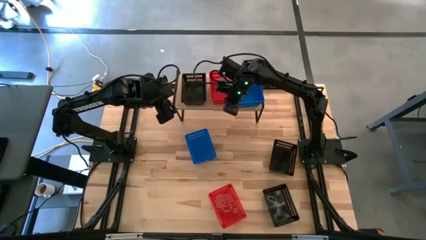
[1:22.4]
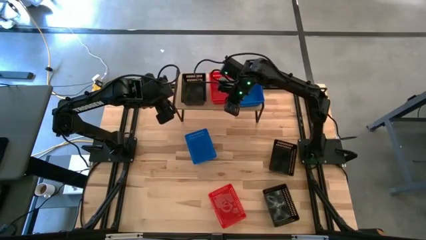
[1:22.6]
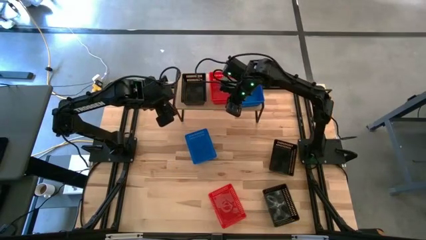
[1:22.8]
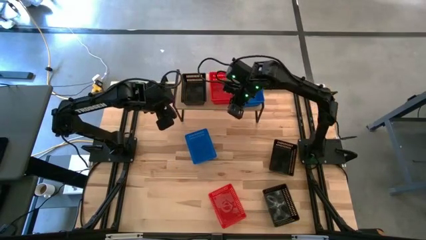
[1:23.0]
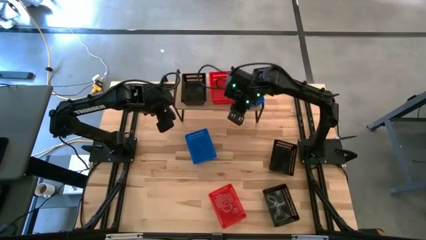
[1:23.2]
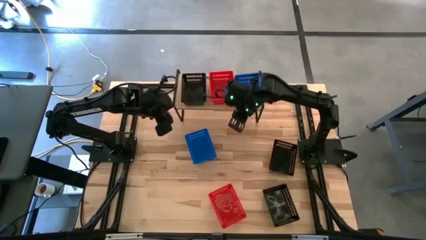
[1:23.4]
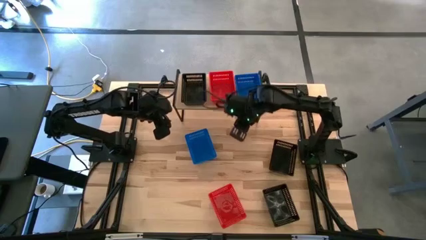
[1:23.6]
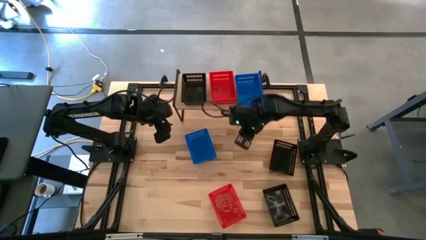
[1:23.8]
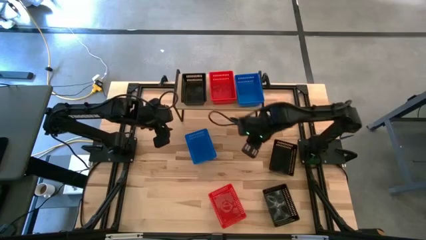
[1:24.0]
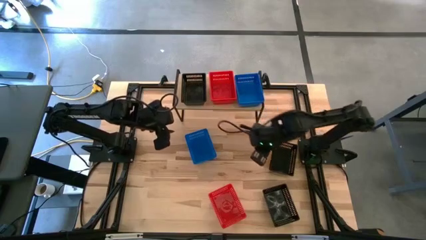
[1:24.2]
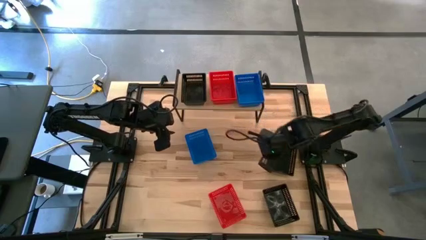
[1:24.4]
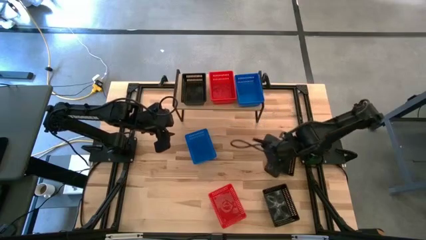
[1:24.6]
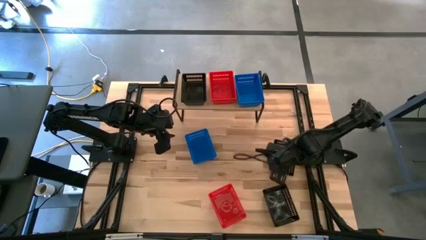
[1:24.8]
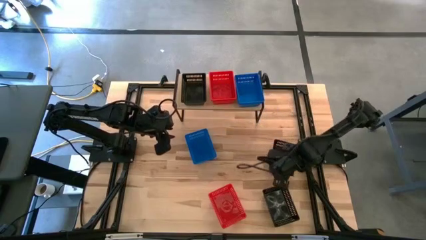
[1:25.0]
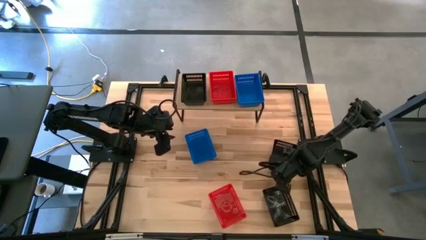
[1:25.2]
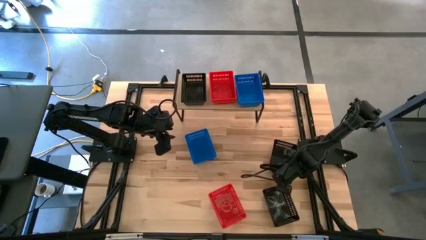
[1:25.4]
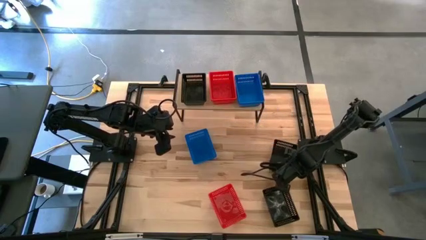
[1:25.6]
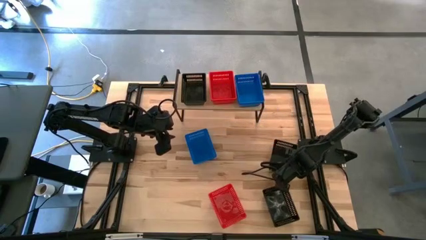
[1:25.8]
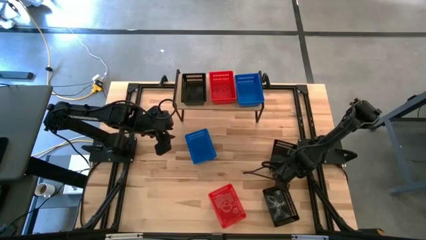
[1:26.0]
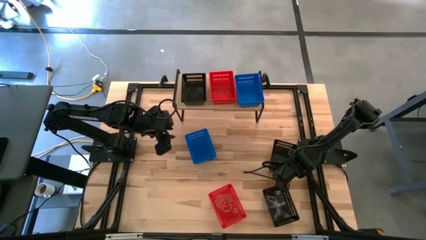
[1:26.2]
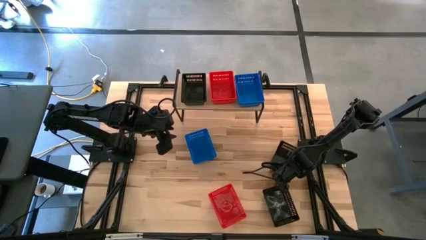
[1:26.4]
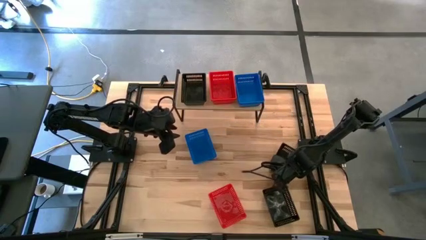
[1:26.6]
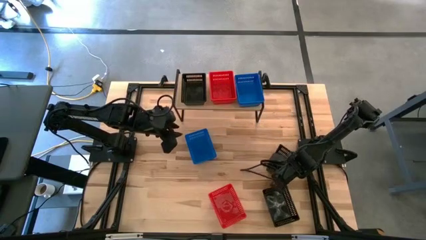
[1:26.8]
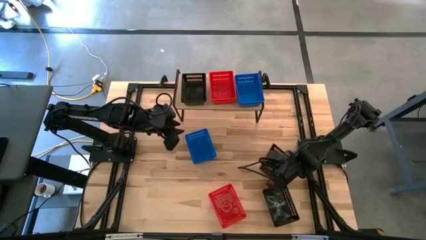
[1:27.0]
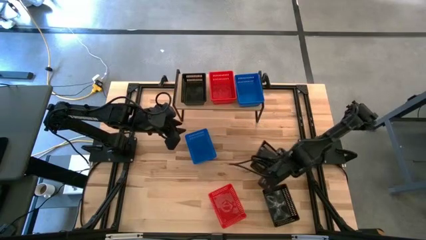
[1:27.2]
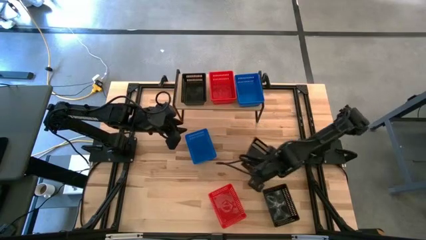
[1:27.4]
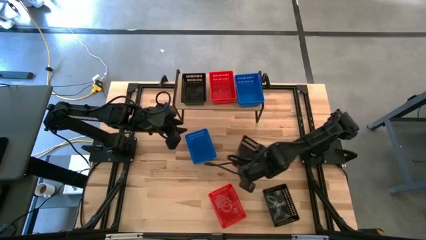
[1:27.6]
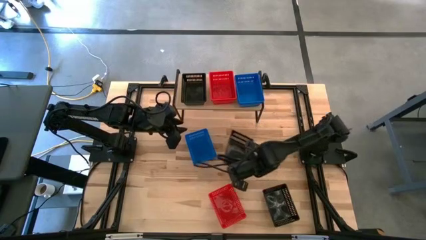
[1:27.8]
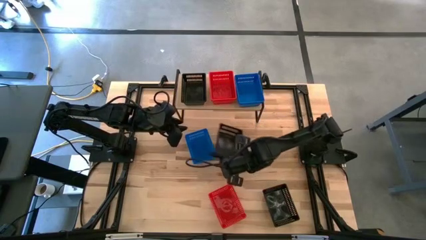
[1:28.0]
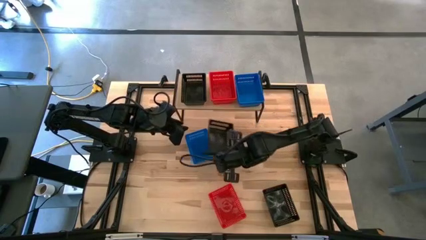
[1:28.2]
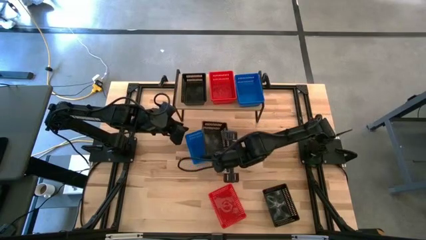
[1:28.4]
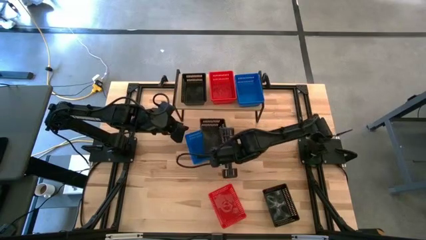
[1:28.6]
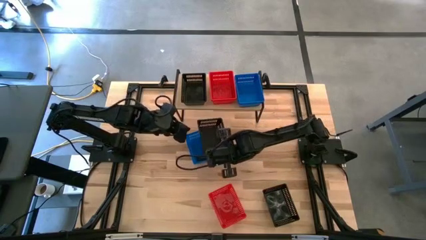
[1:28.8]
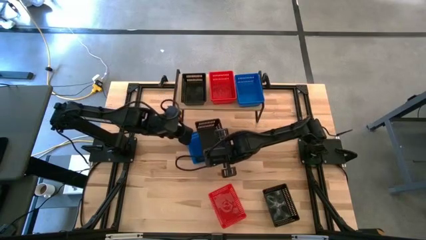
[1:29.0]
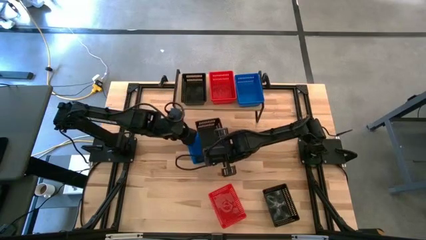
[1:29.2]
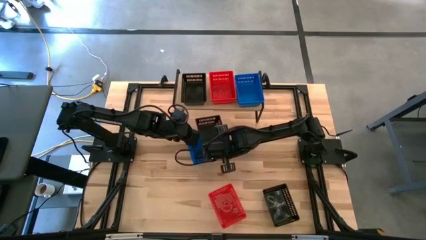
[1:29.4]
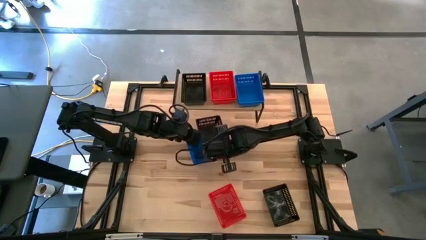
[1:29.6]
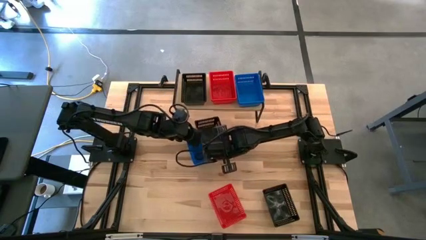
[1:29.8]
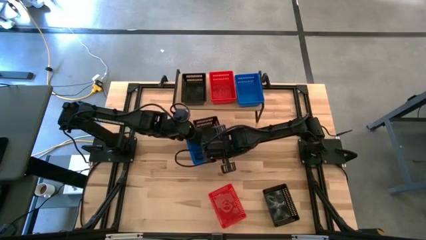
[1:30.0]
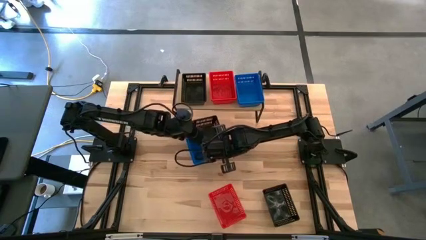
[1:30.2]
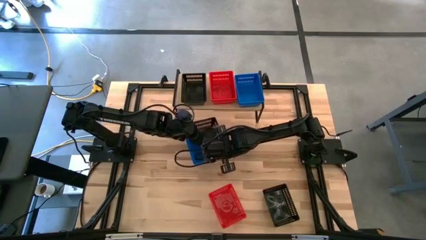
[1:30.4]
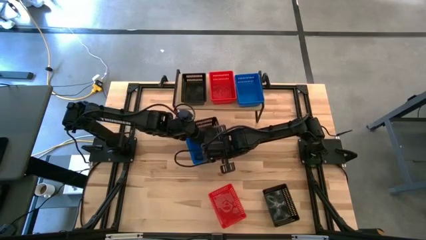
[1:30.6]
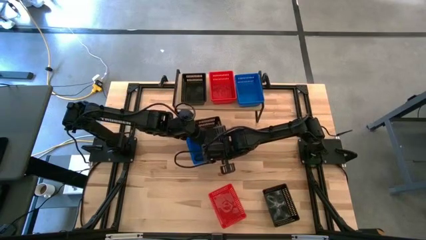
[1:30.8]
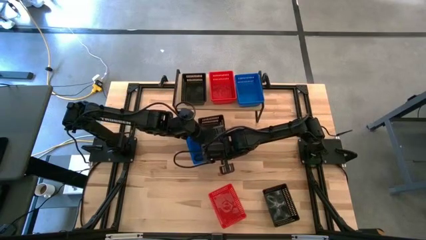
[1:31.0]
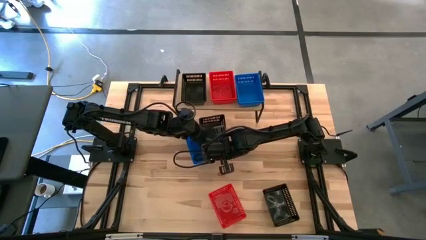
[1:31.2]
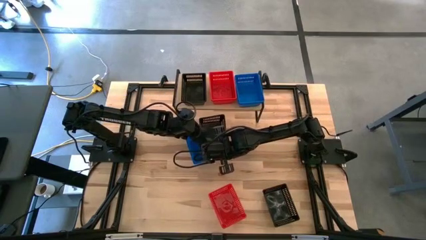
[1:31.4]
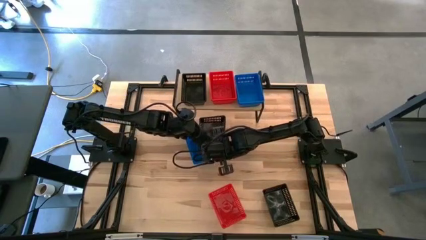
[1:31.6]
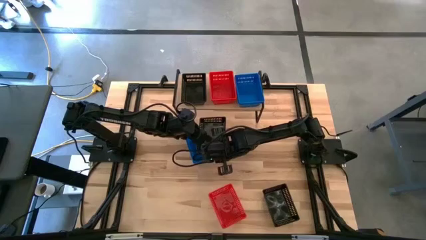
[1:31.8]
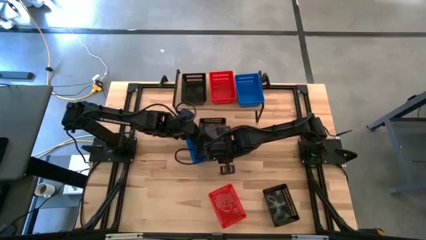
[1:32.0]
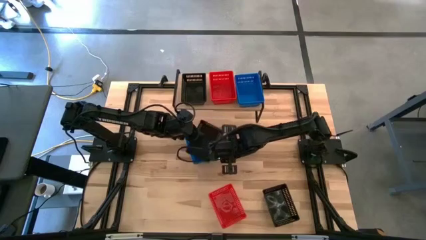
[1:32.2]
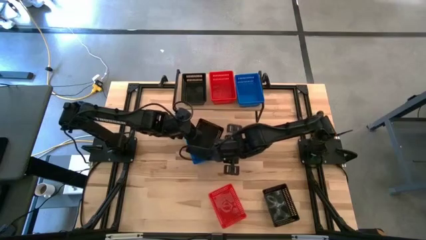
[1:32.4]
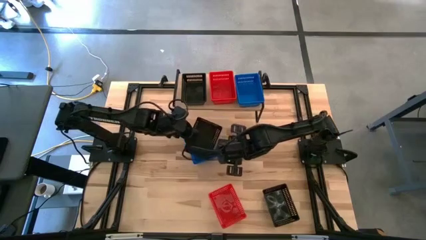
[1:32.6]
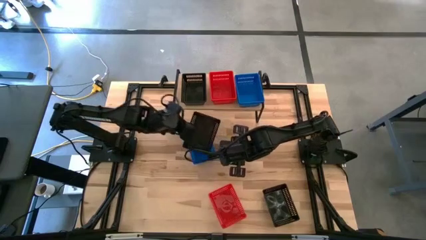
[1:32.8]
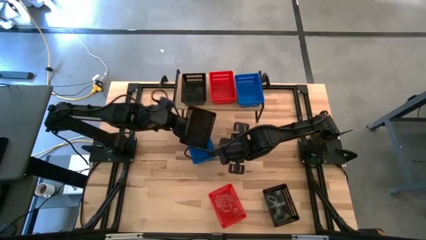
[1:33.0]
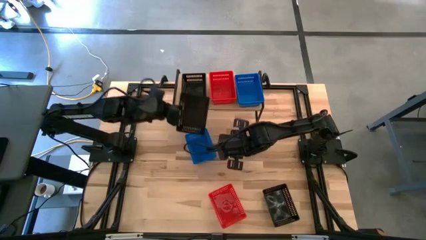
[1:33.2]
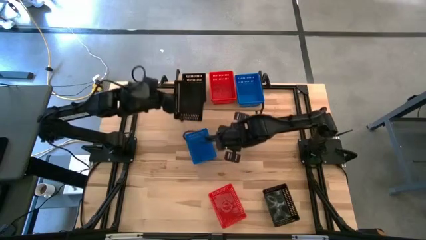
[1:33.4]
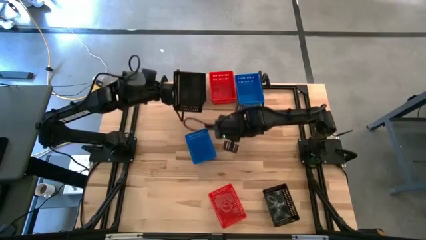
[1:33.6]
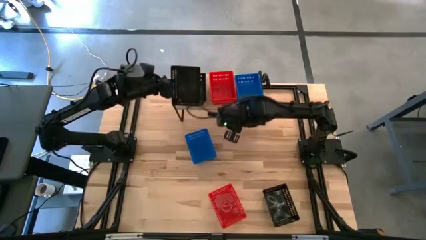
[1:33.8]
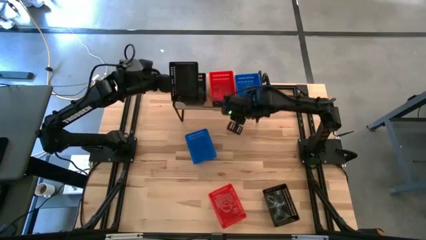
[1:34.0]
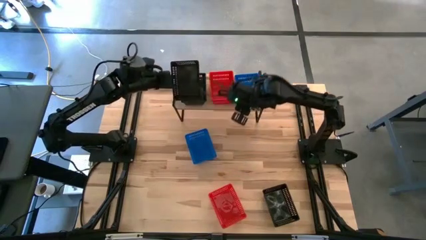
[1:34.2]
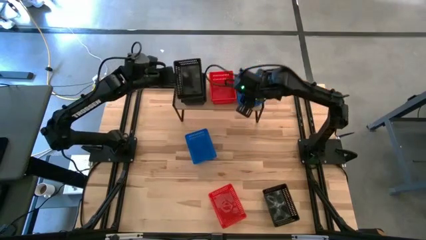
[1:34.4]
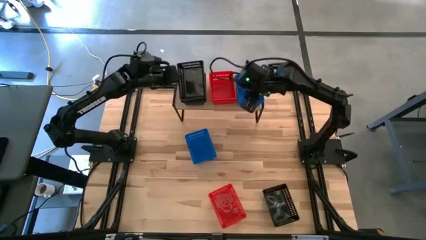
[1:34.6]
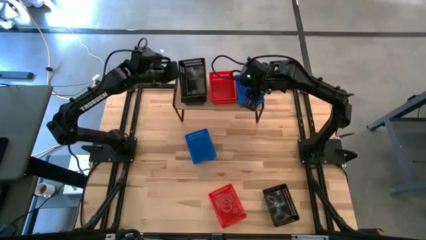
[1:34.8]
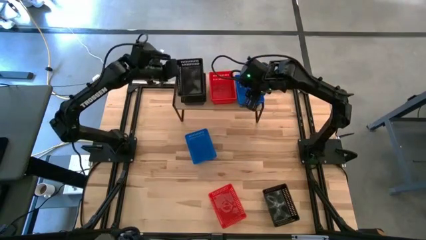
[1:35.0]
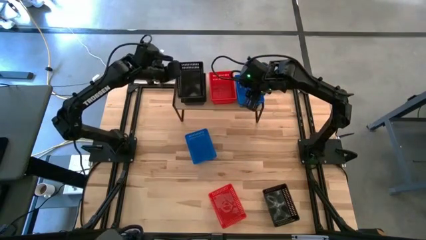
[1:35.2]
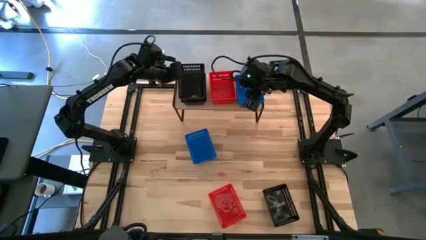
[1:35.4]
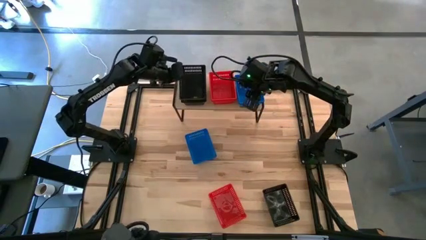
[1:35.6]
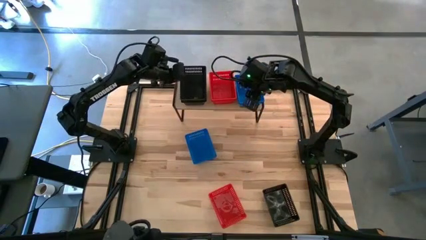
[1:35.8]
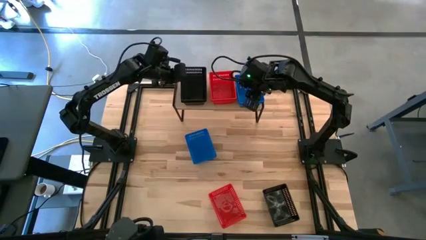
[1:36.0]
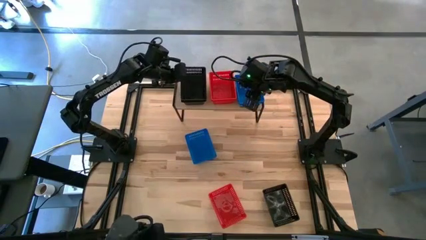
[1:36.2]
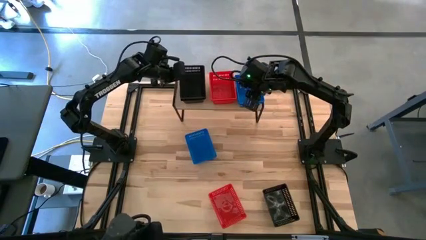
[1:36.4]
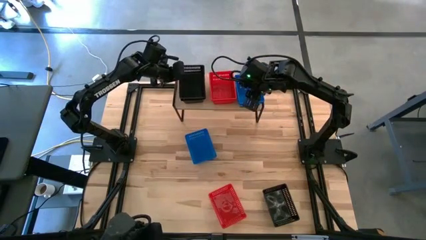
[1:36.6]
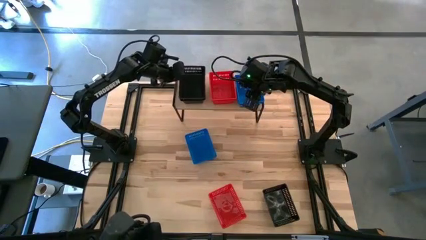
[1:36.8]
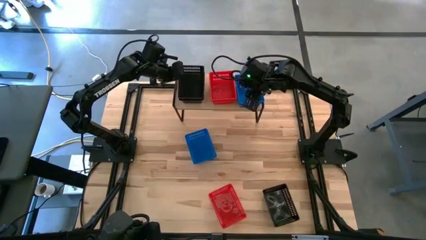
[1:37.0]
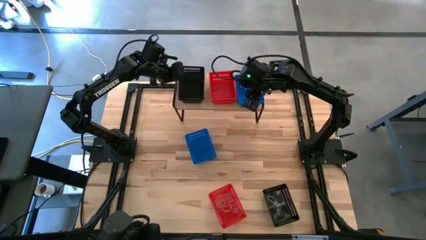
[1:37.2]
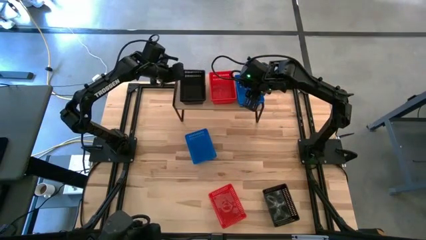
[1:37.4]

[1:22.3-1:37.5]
Task: Stack baskets on shelf by color
Stack the top black bin on top of the black bin on the shelf

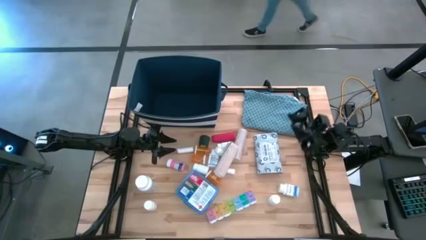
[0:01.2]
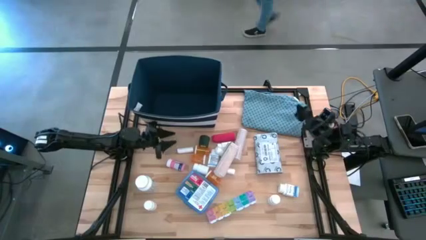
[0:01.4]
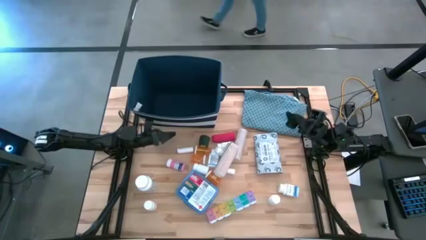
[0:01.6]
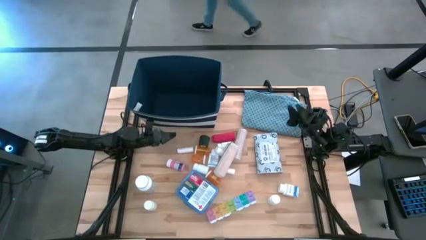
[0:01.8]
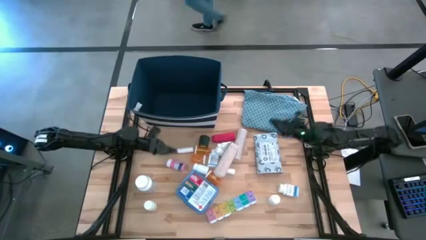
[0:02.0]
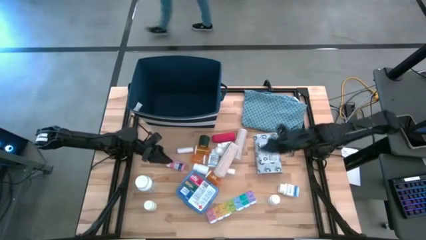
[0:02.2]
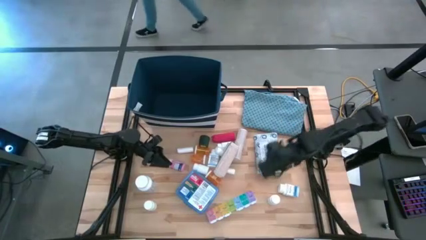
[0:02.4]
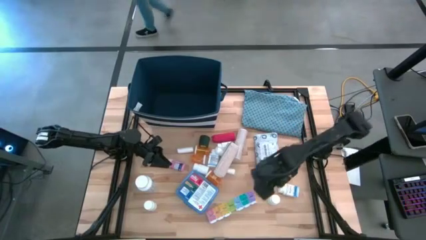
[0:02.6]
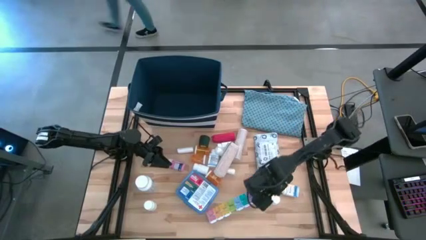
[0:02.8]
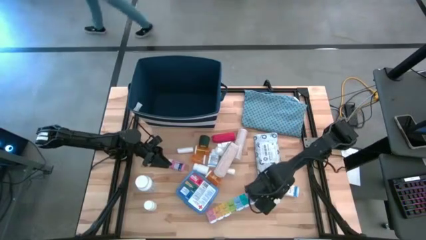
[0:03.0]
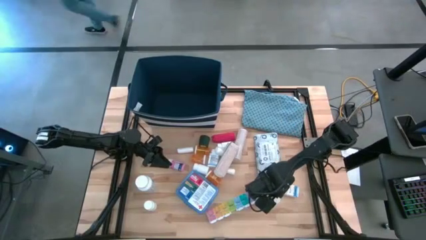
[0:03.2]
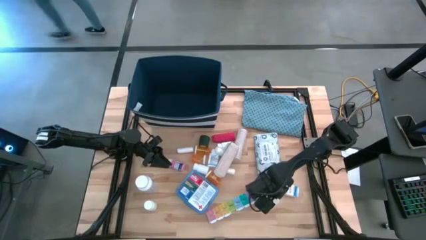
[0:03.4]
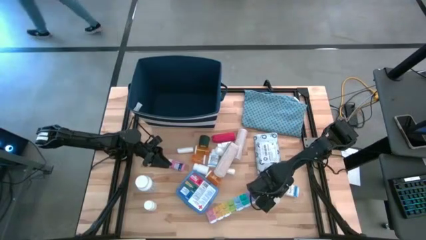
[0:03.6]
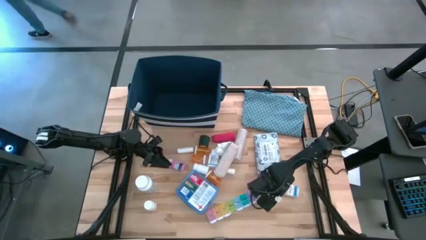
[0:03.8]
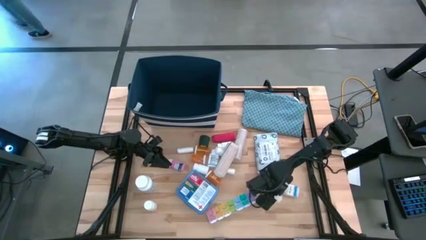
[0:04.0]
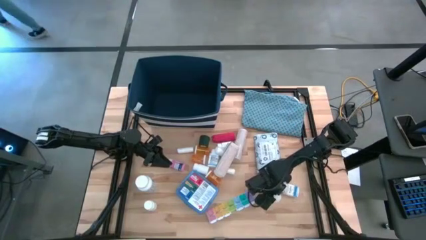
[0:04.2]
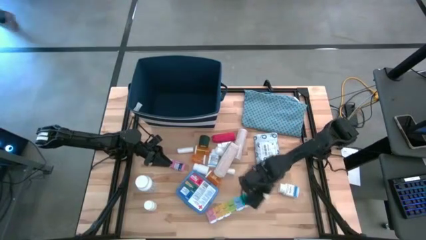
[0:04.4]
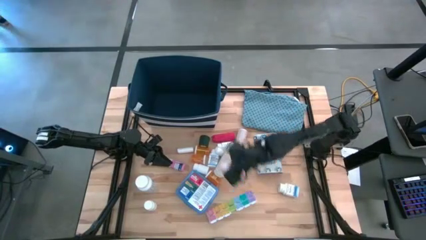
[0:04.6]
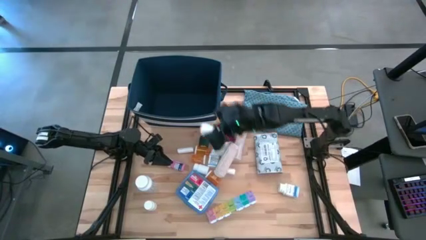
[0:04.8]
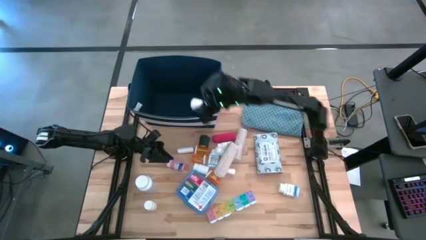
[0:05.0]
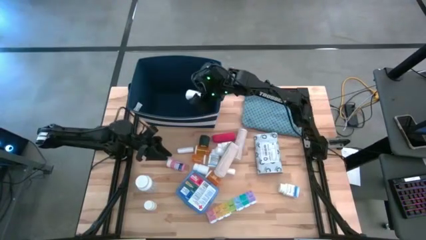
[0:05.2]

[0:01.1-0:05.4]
Task: Pick & place medical supplies in basket/bin
Put the white pill bottle into the blue bin
